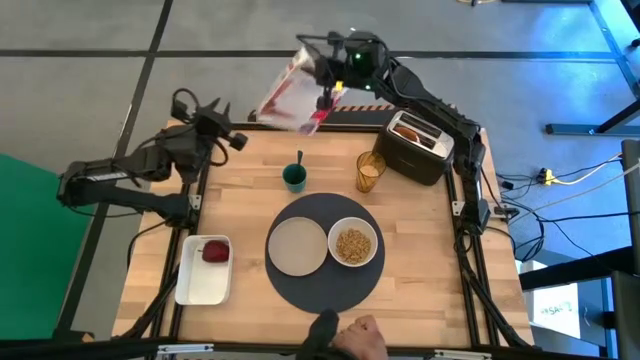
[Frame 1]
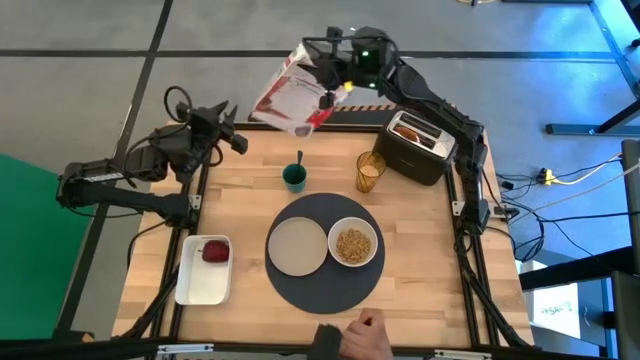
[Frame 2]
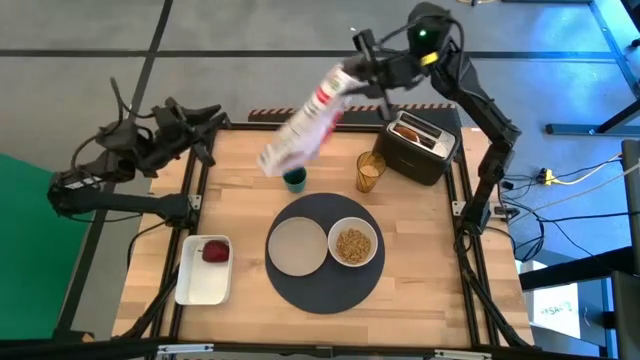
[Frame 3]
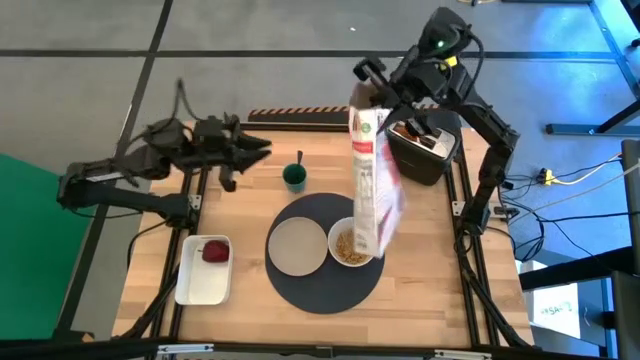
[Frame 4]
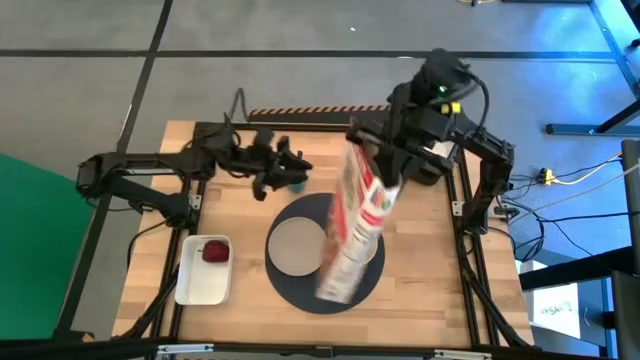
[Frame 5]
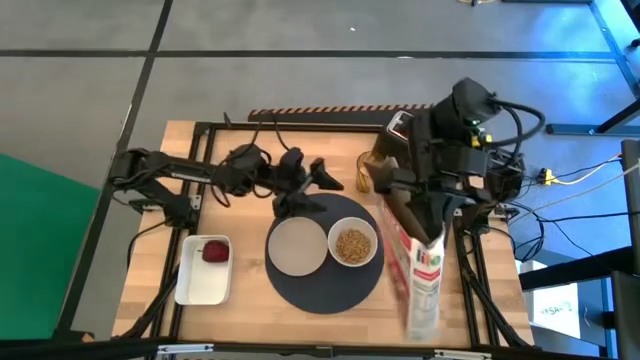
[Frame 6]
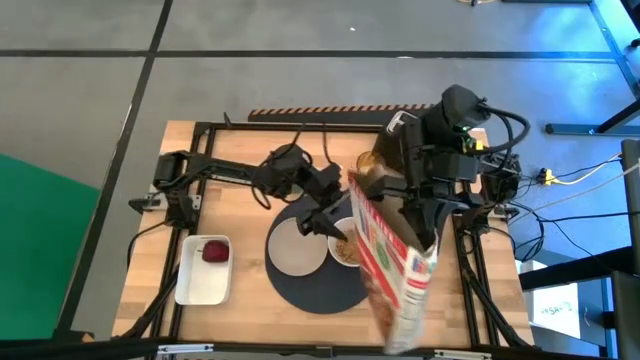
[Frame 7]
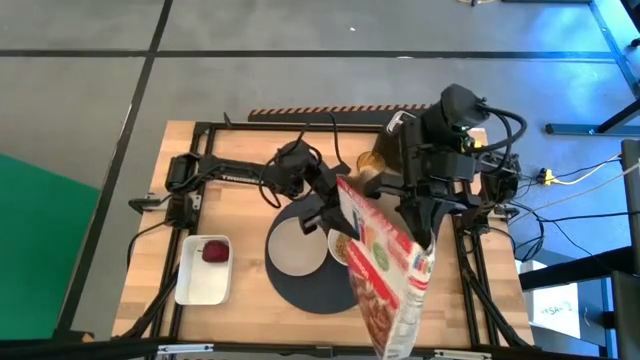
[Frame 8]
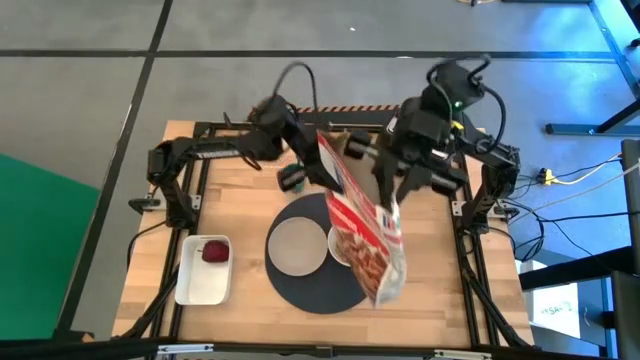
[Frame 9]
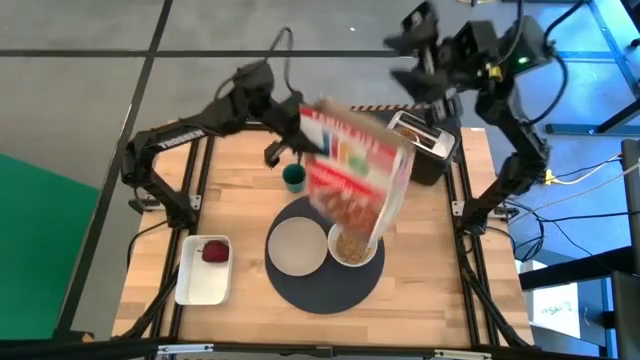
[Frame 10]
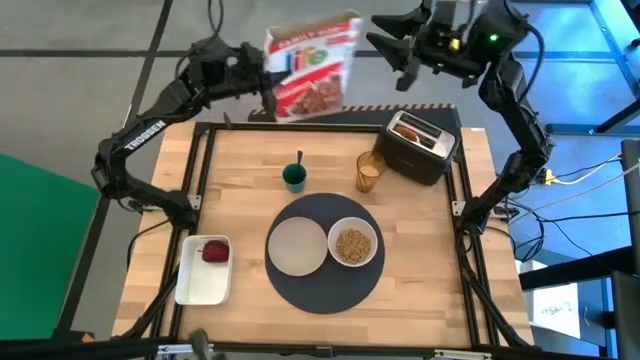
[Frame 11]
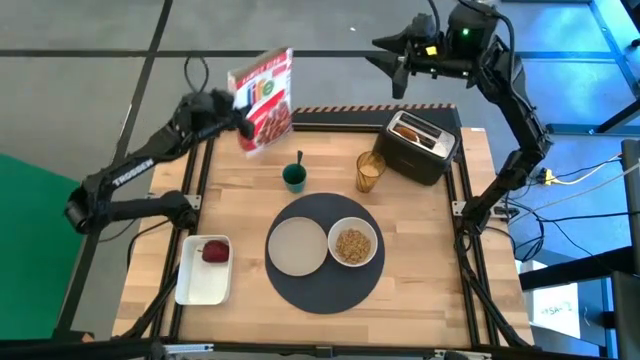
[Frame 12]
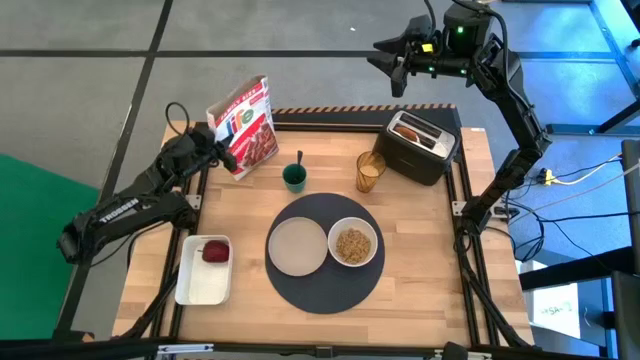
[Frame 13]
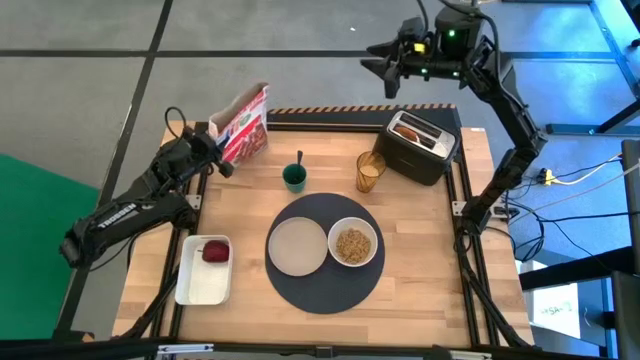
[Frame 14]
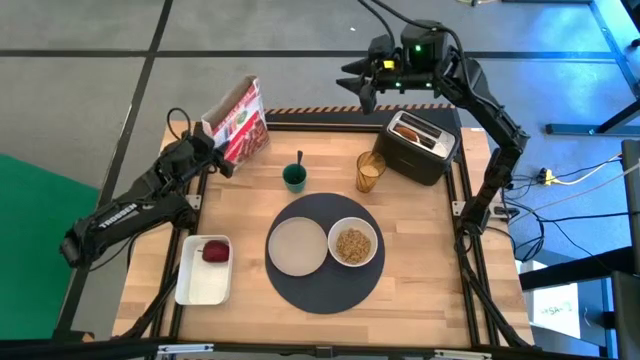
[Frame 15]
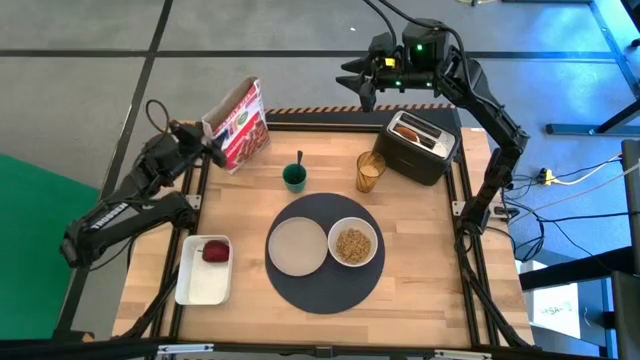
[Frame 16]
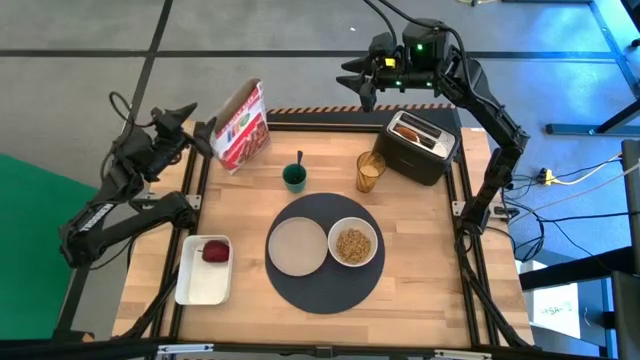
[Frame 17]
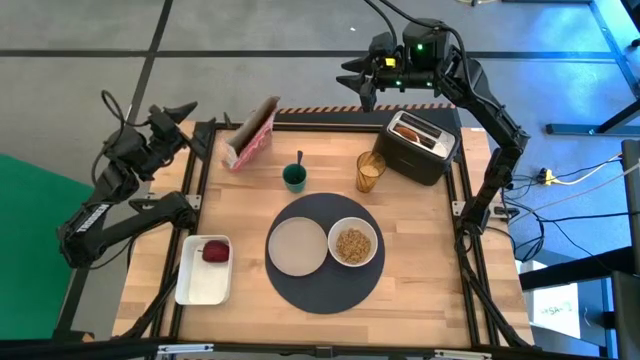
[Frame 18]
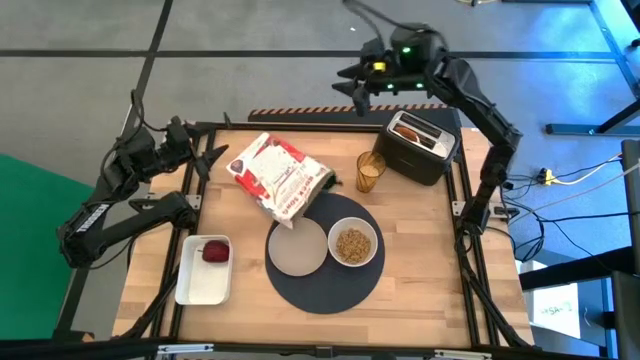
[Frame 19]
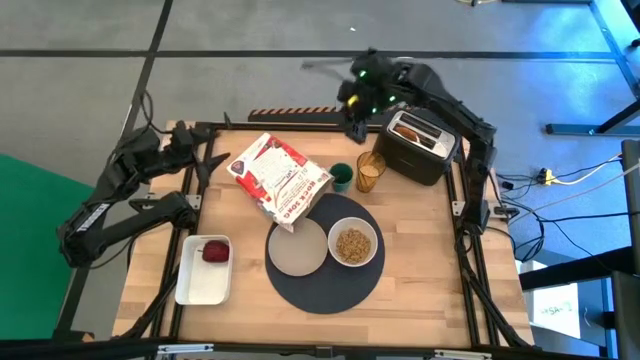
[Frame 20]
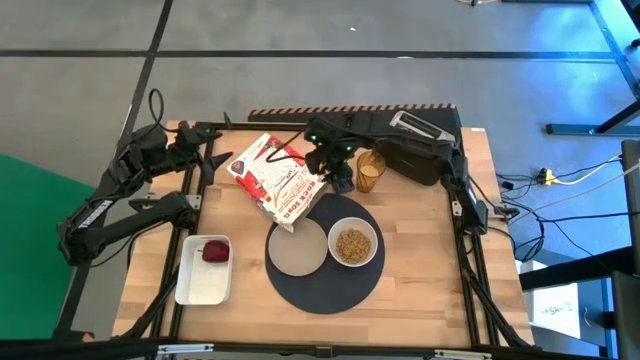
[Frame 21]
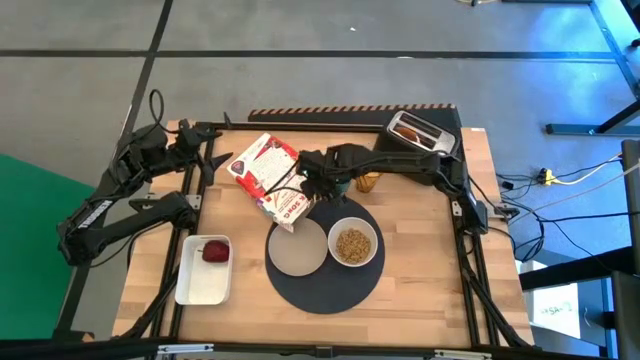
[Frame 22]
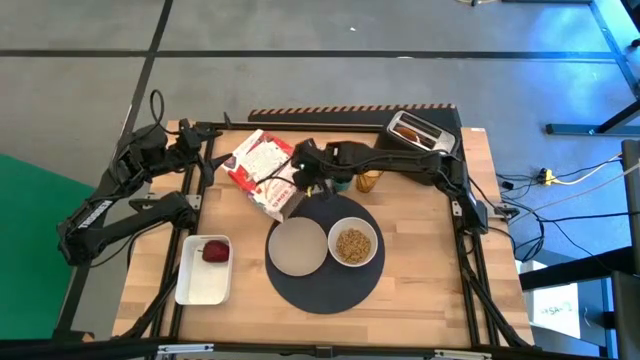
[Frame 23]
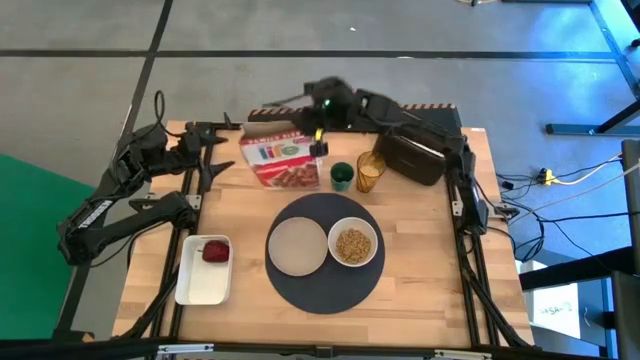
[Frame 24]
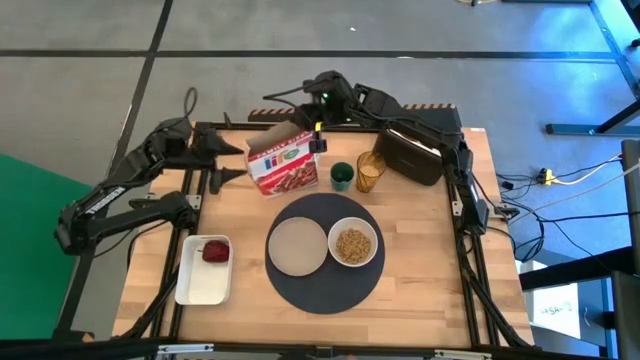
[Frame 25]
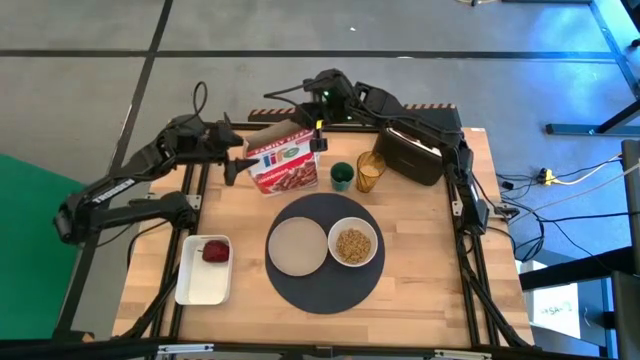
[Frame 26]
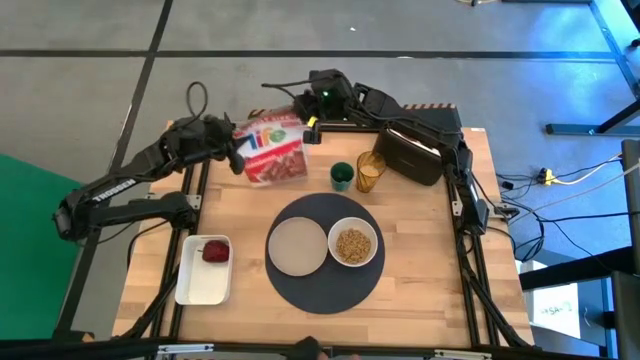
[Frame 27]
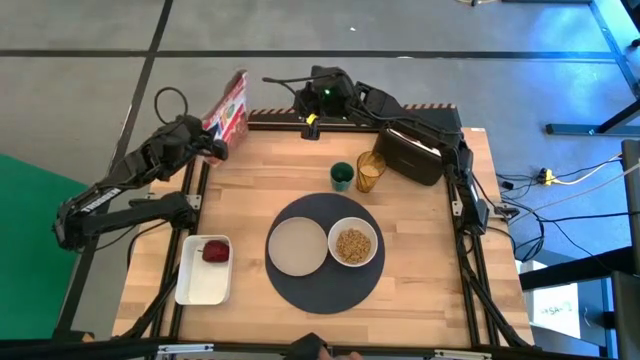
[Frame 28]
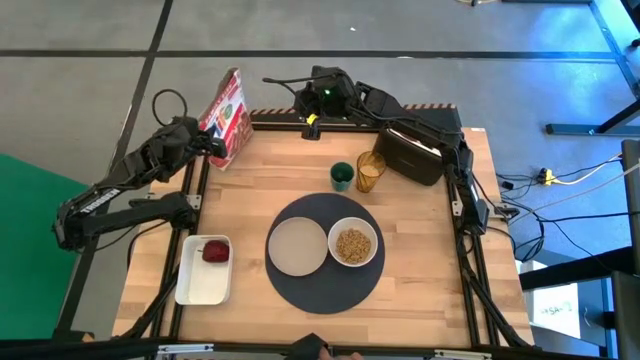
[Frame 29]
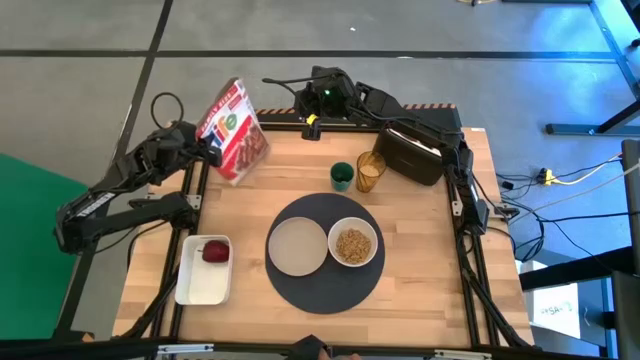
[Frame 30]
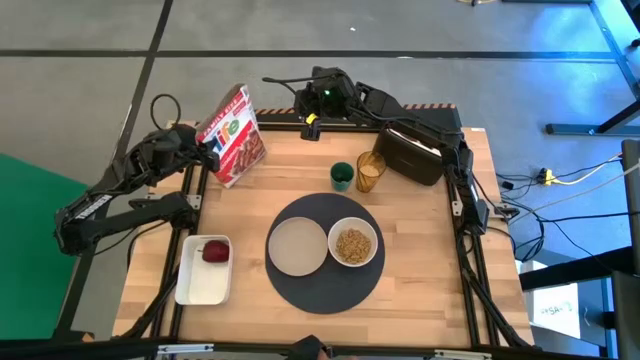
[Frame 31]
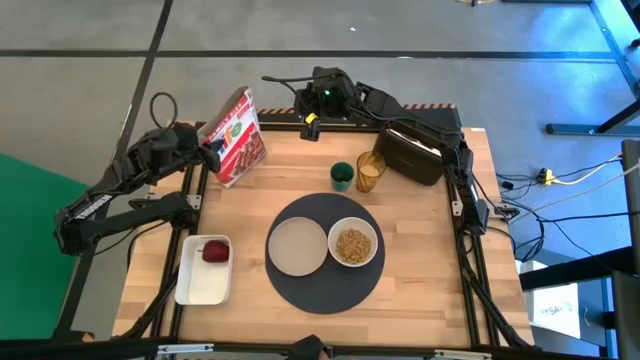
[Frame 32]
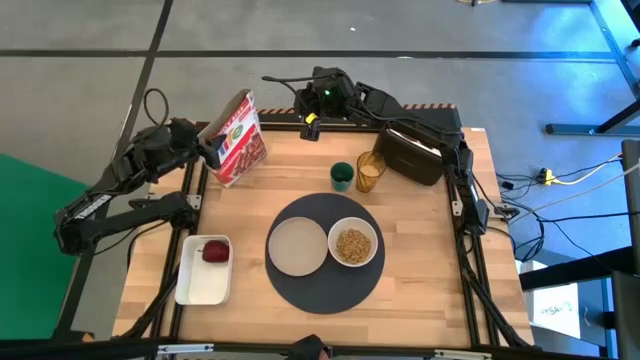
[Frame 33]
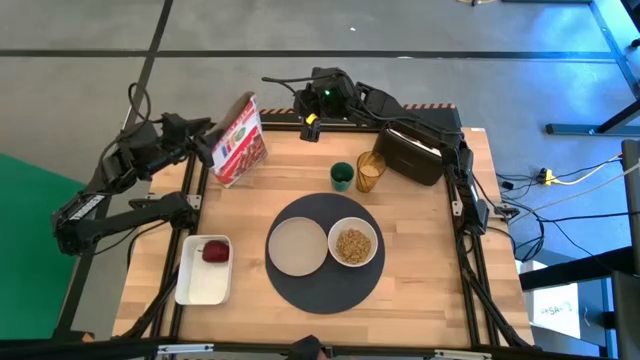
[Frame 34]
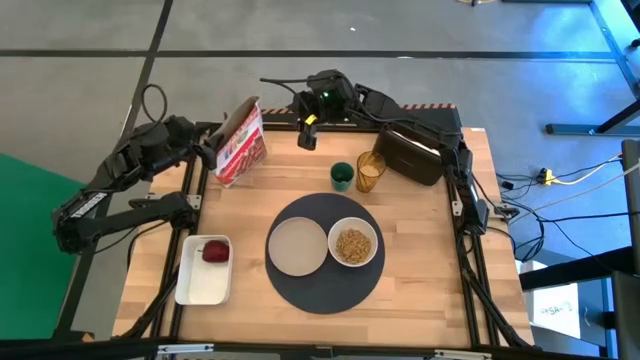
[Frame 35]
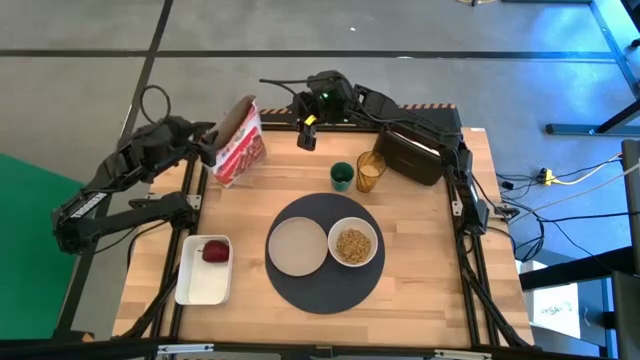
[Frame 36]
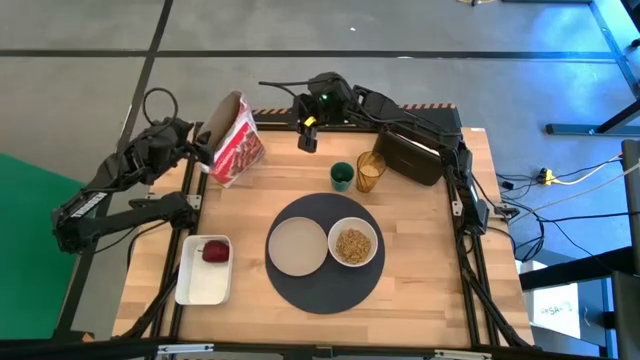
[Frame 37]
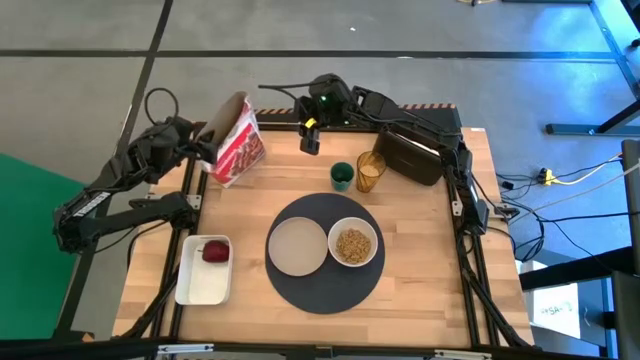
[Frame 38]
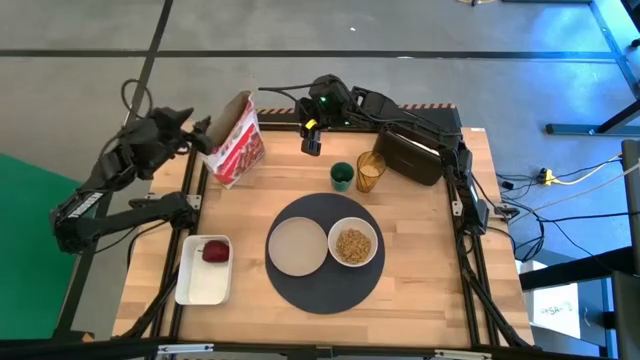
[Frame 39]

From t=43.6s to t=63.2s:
Task: Arrange a breakfast setting
Adjust the cereal box

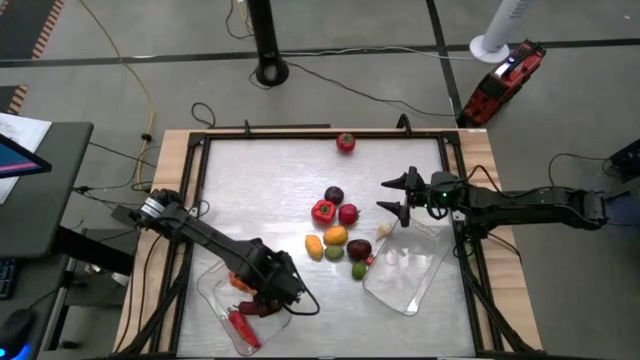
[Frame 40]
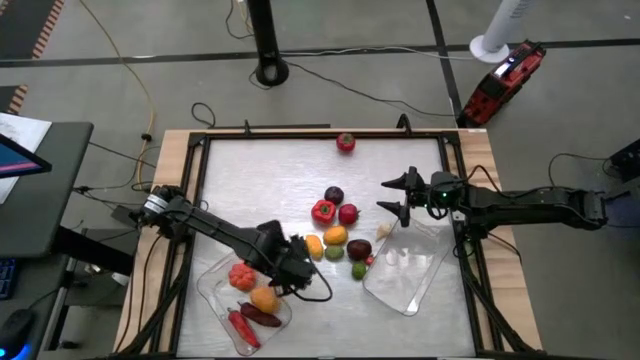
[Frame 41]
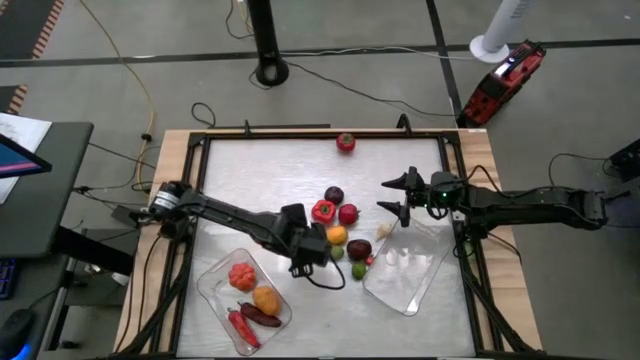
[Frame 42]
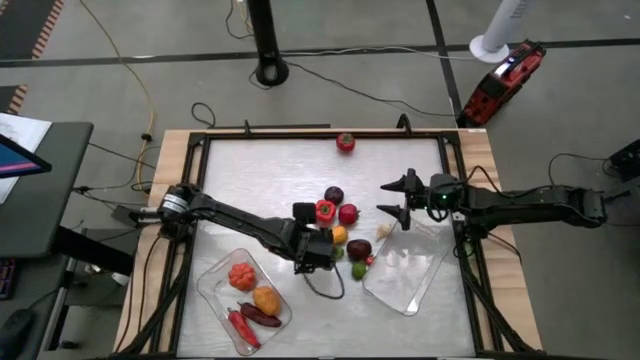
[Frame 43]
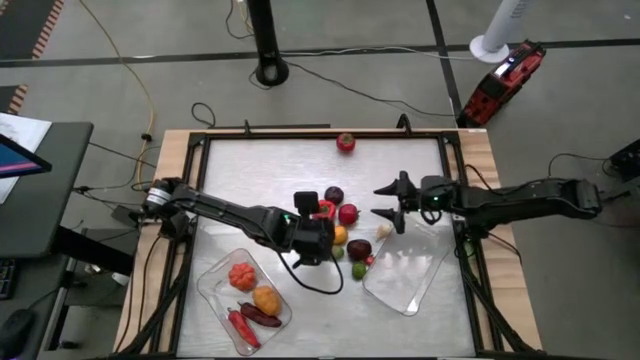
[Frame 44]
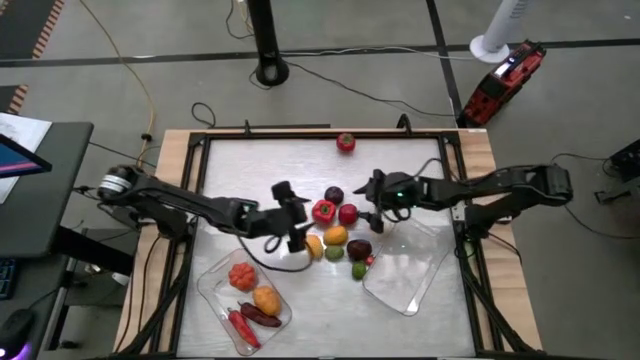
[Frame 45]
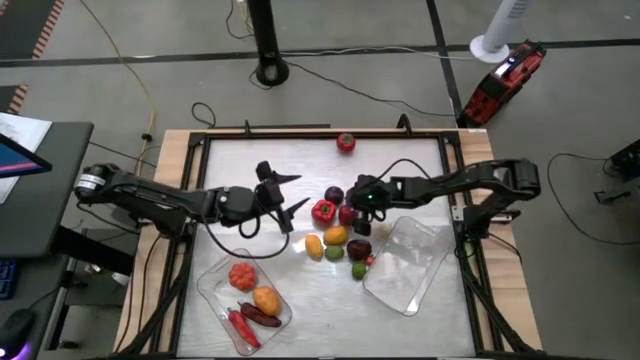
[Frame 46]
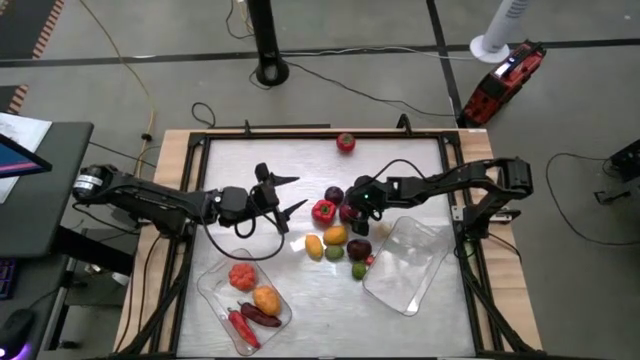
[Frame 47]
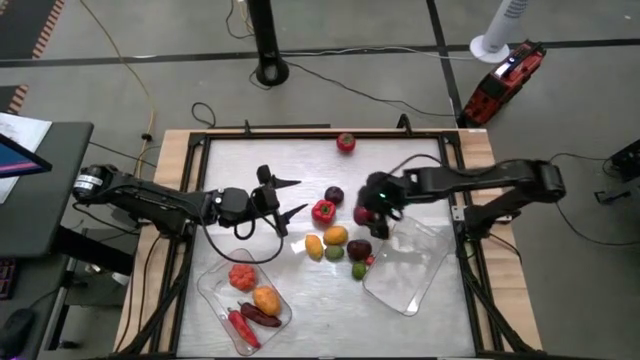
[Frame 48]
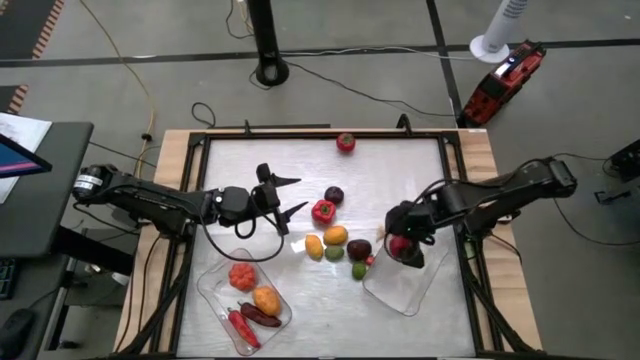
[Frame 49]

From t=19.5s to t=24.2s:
Task: Sort produce into baskets
Put the tomato into the right transparent bin
